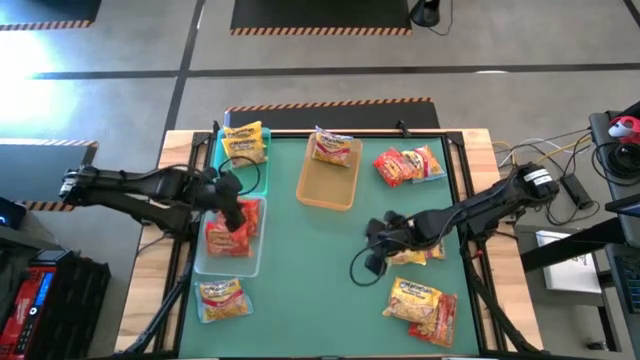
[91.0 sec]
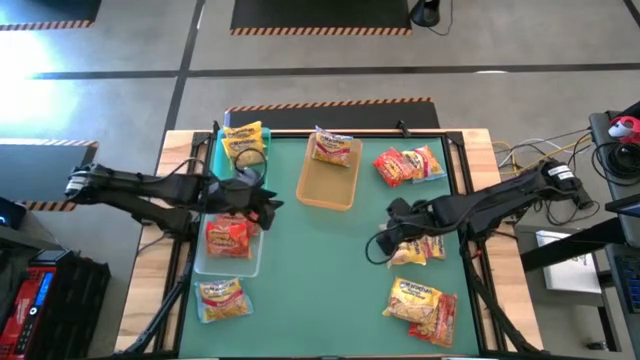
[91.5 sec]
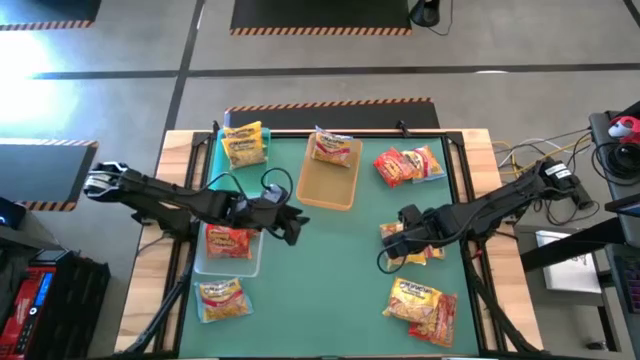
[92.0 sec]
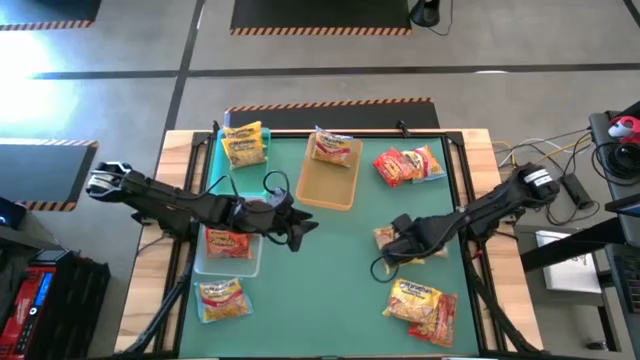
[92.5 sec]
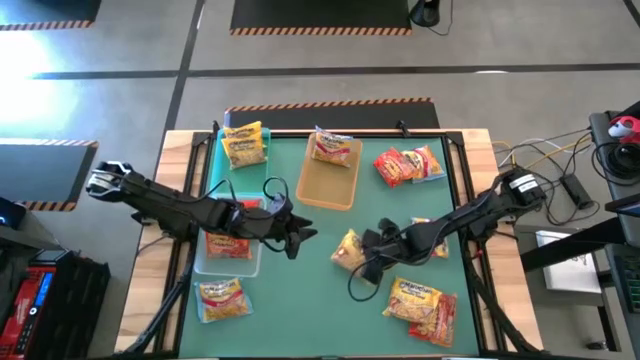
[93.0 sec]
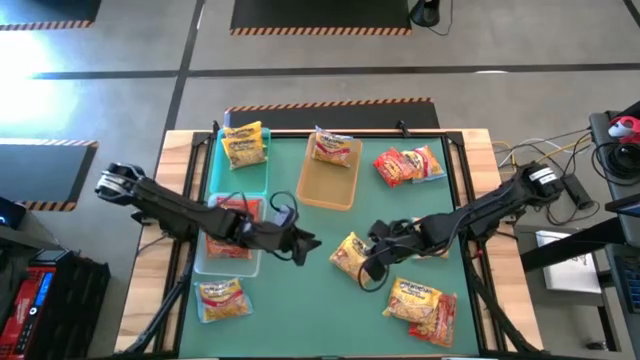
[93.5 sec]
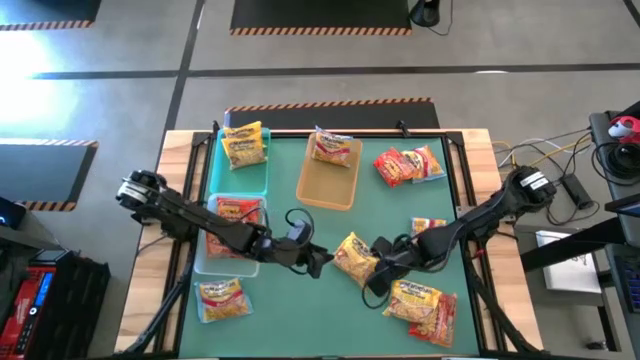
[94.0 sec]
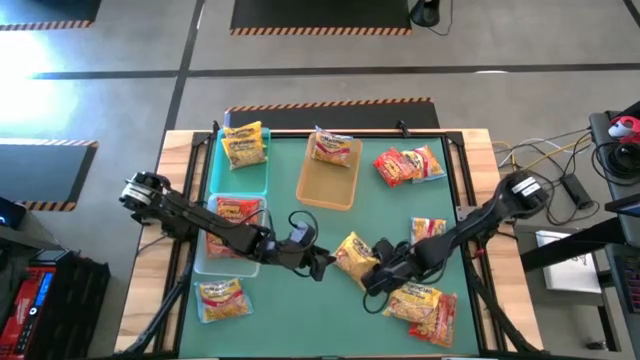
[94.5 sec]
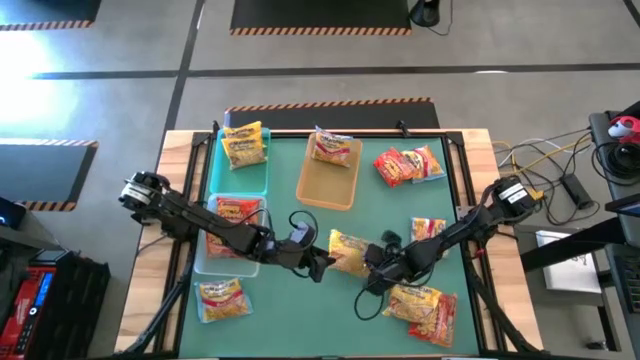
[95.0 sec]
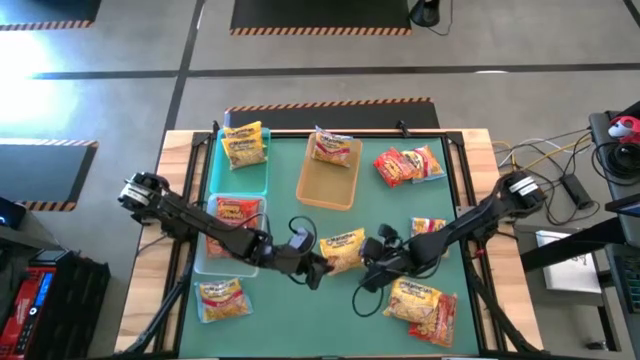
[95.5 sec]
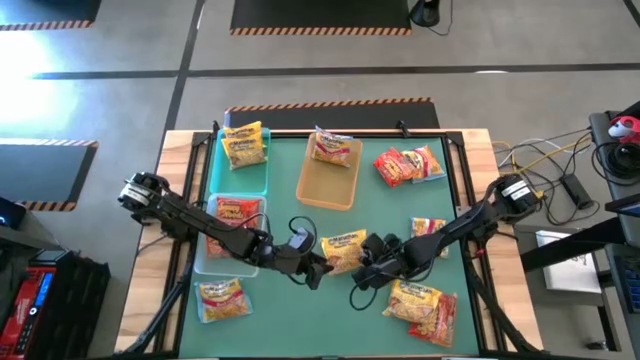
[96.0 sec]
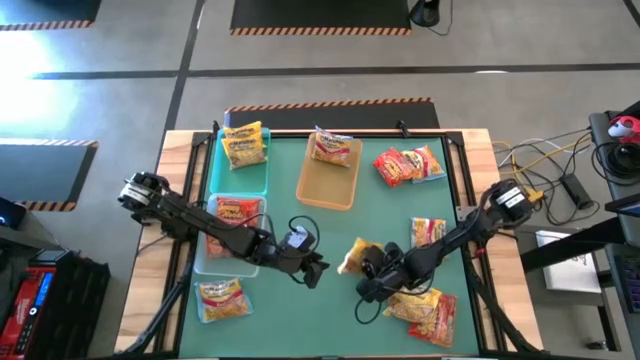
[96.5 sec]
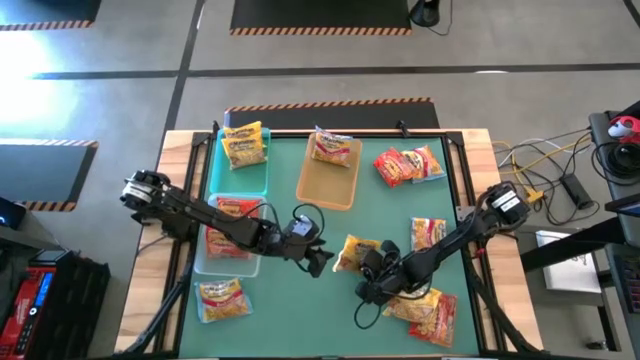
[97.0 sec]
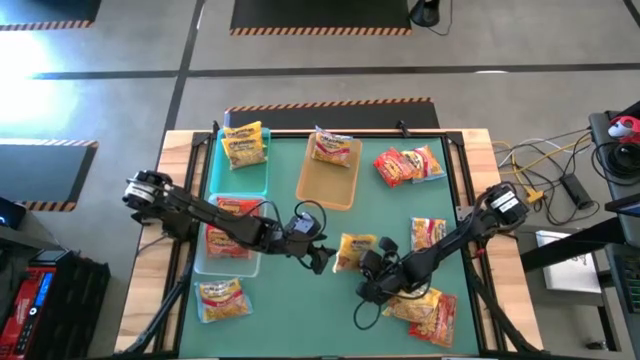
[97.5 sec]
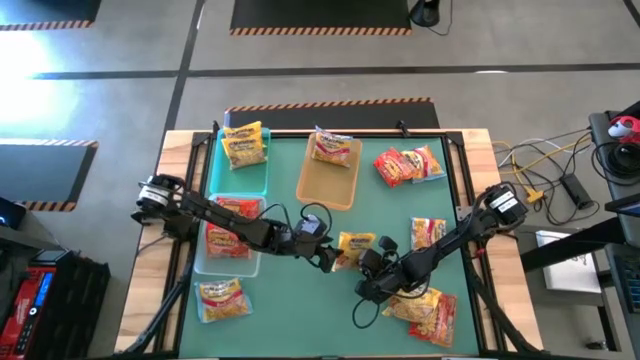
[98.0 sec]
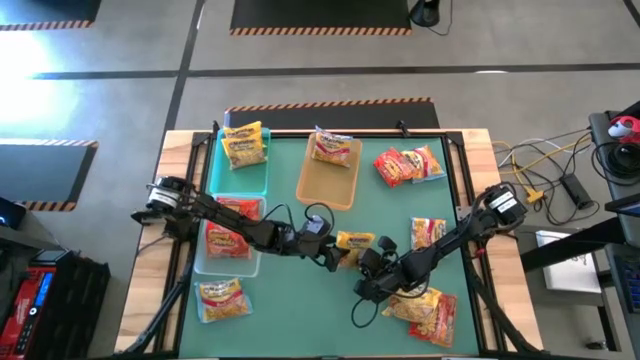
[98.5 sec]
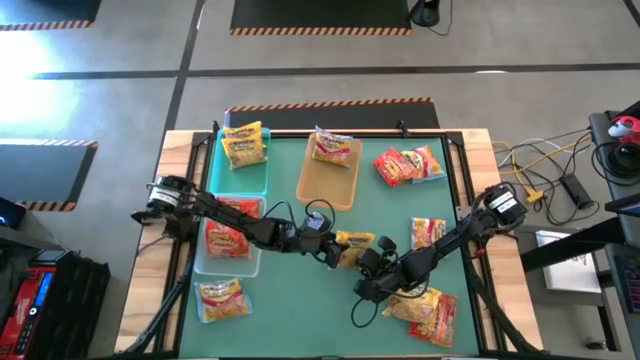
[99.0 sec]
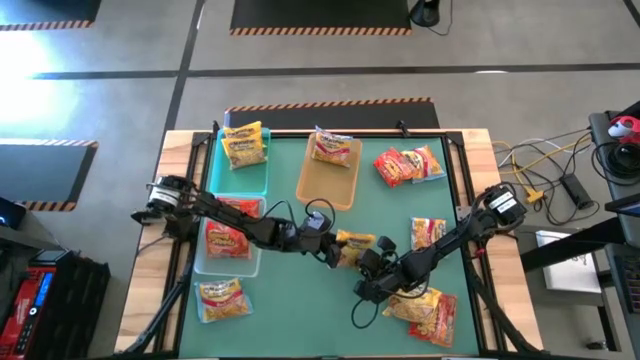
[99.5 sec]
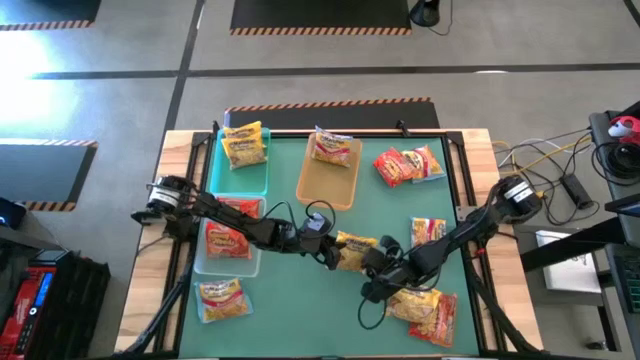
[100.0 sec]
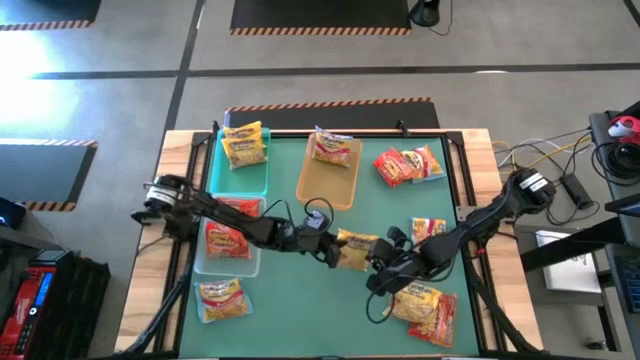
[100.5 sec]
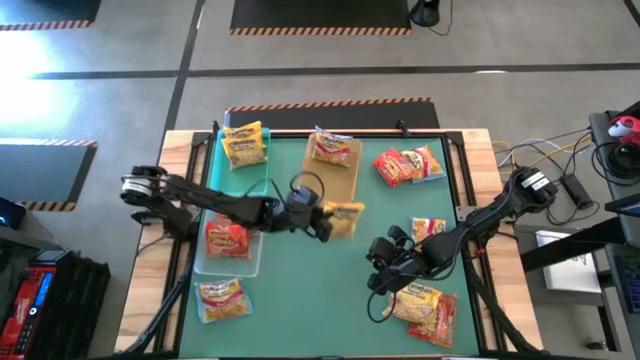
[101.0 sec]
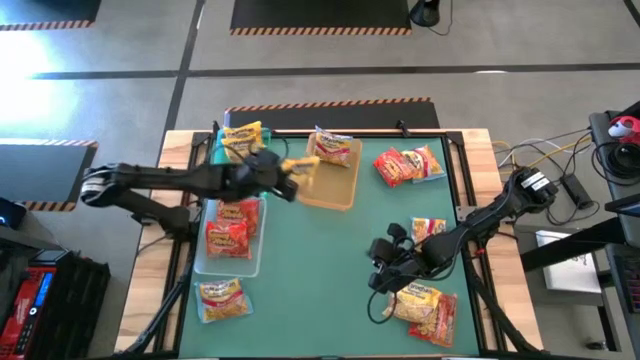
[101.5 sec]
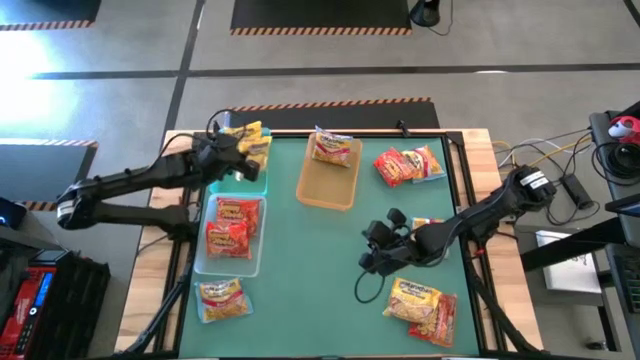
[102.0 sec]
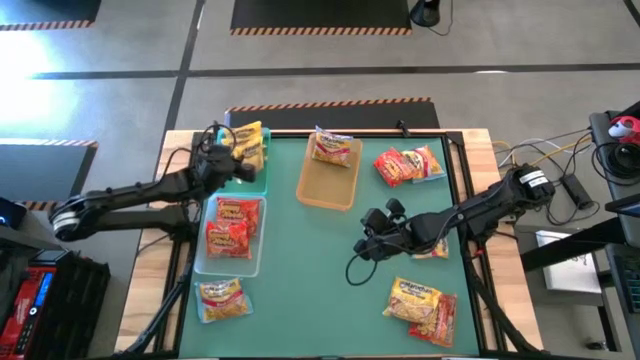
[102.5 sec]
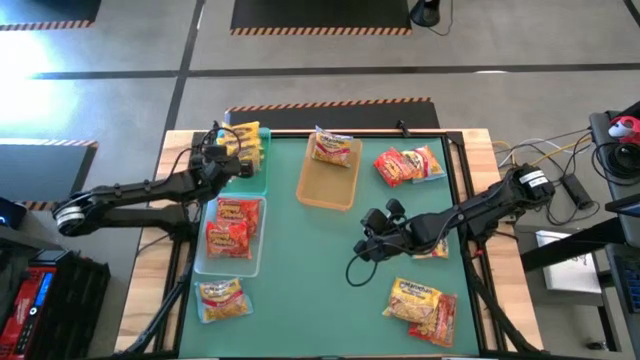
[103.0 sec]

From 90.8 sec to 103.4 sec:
Task: Sort Maruchan noodles
Put the yellow noodle pack into the blue bin

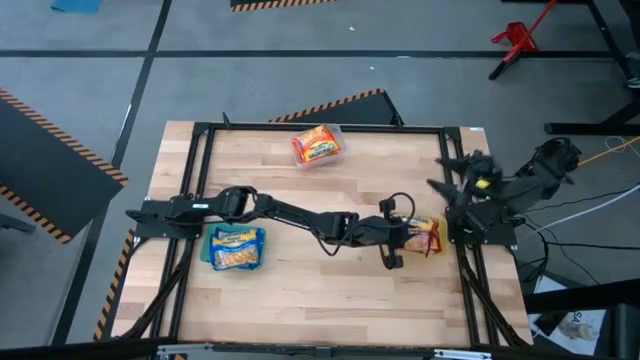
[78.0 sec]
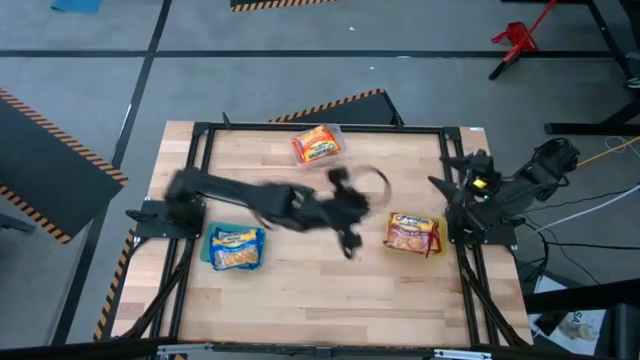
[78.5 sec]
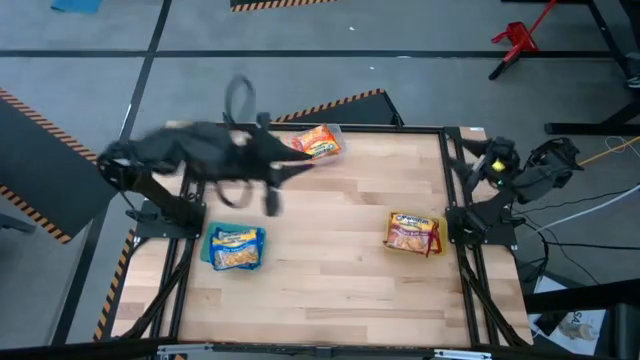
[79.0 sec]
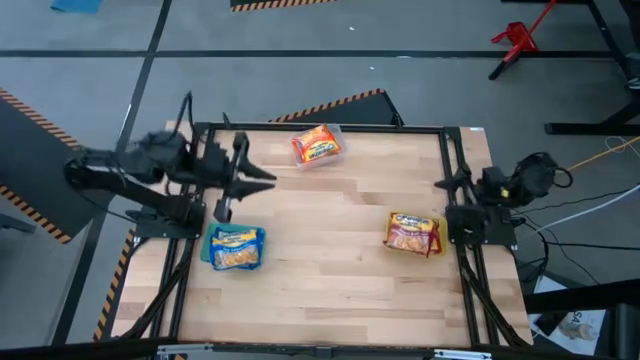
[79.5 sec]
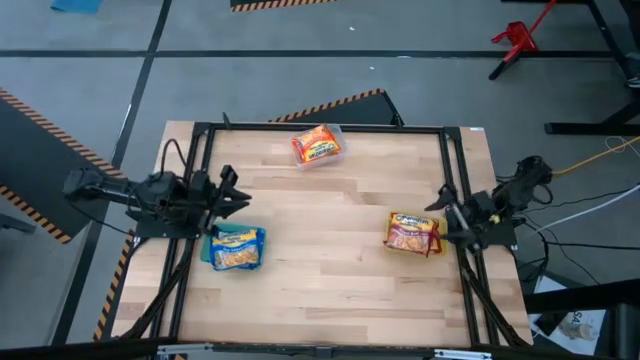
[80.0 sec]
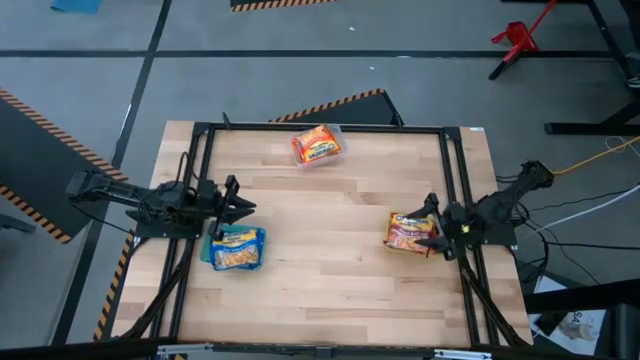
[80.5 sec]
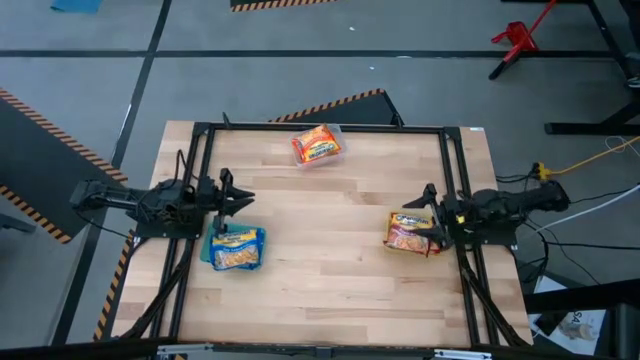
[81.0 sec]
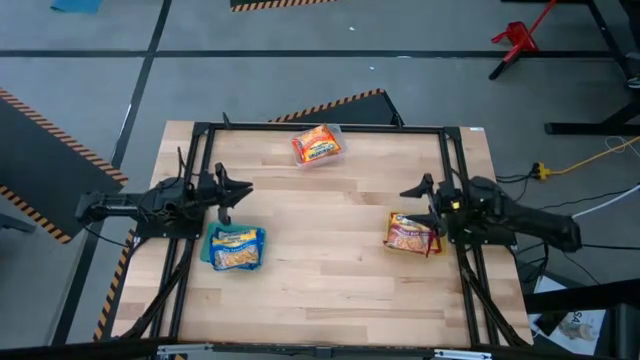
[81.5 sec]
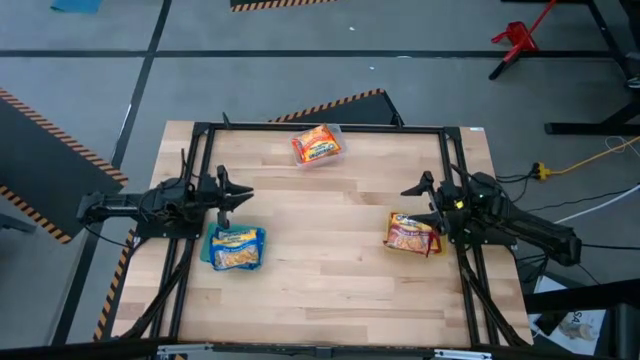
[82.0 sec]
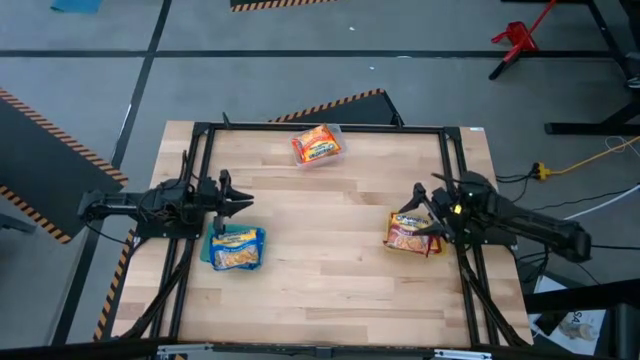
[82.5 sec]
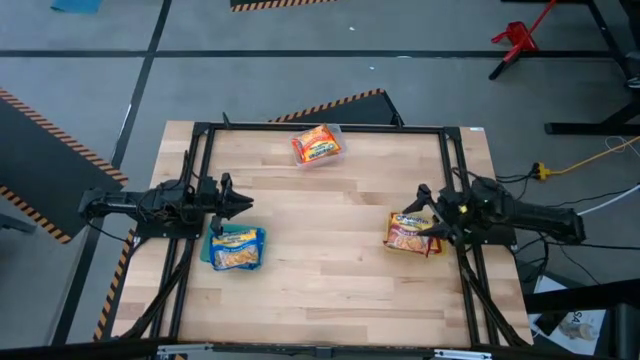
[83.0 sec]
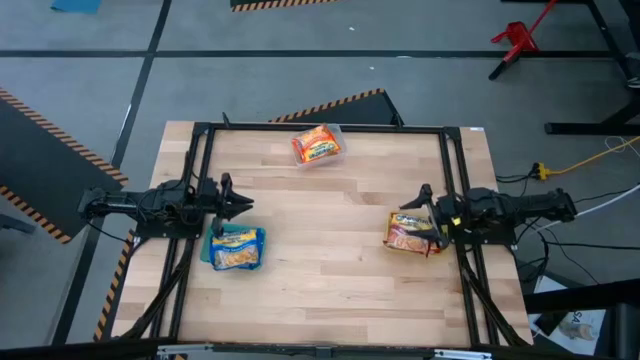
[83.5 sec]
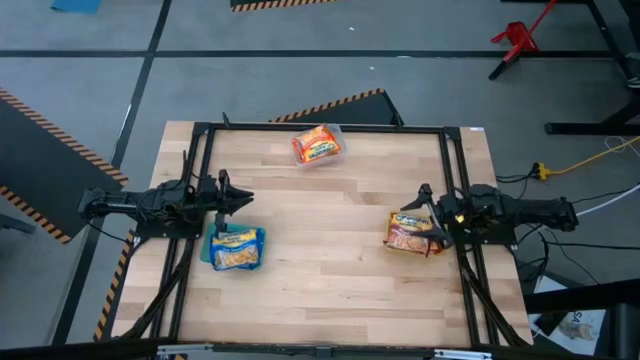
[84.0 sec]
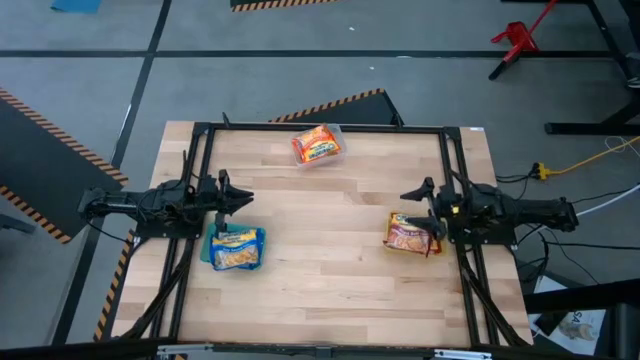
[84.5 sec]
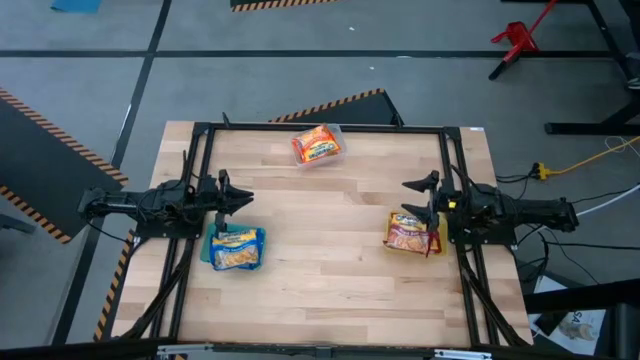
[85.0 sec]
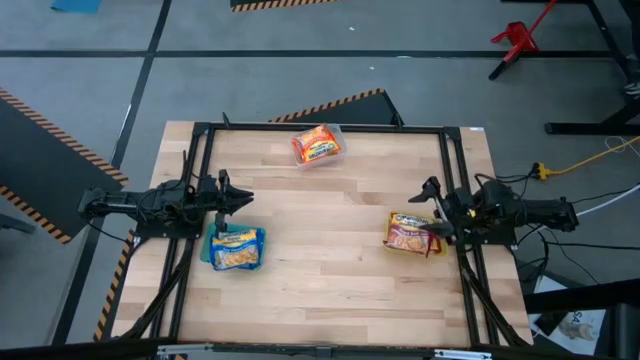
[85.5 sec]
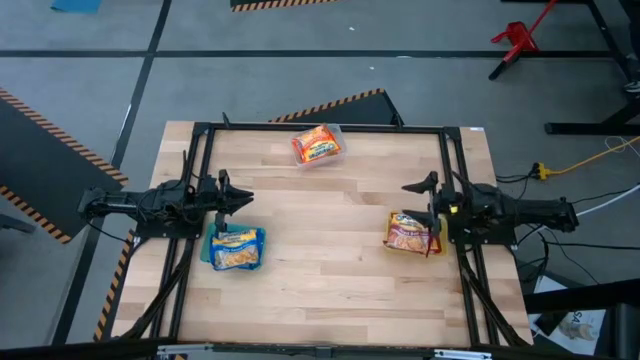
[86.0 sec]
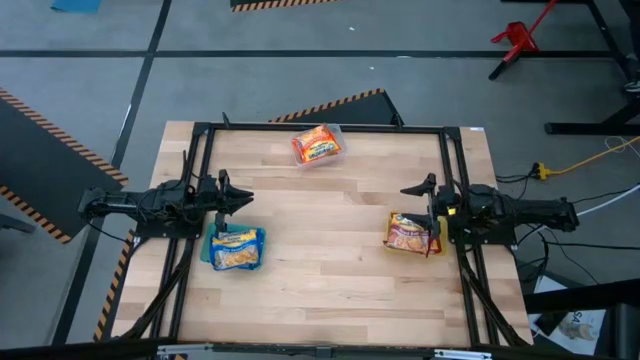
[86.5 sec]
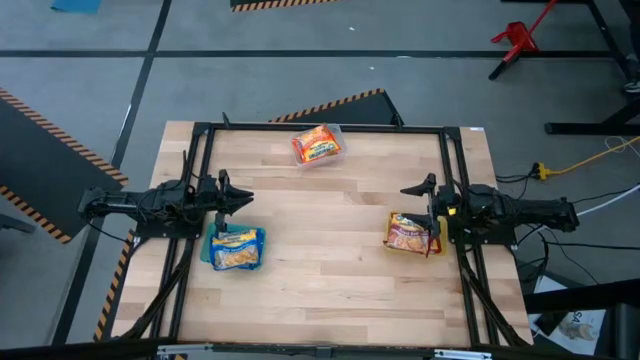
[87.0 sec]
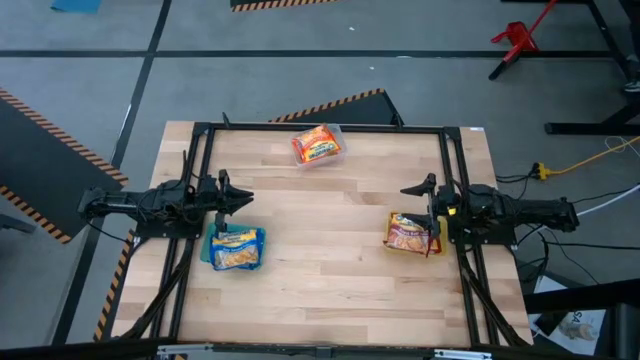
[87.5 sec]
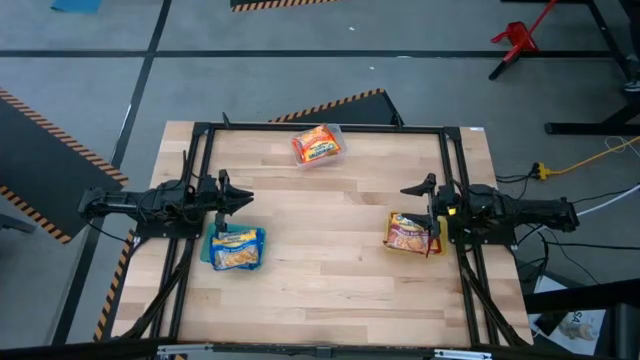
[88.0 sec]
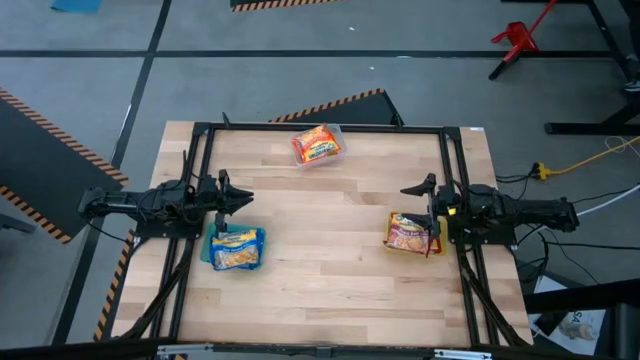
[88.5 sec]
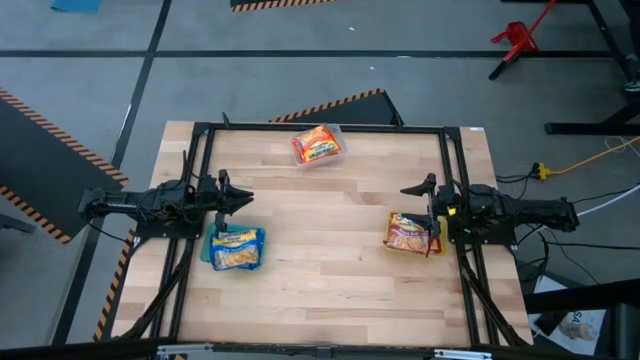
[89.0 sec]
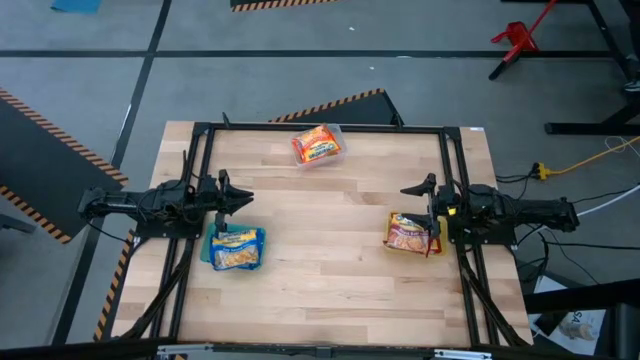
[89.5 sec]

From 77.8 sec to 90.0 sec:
Task: Sort Maruchan noodles
Return to Home Position
